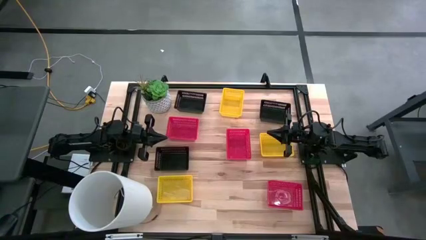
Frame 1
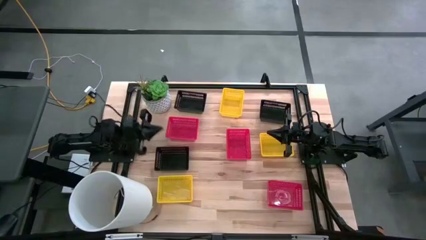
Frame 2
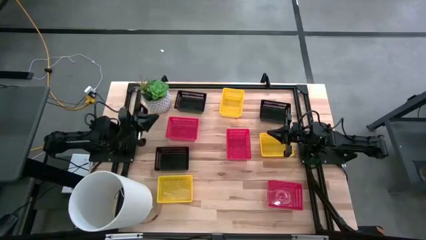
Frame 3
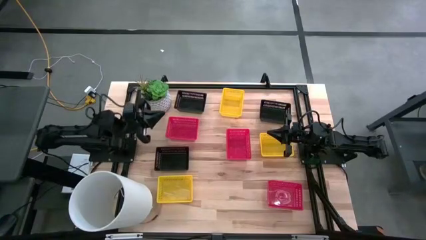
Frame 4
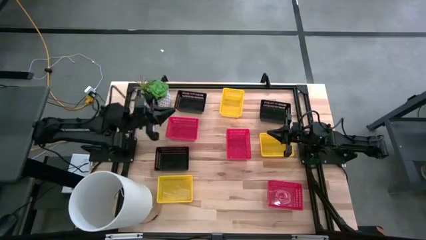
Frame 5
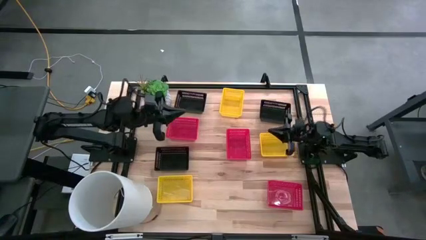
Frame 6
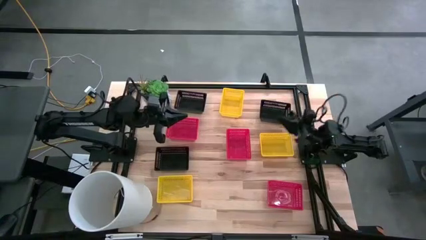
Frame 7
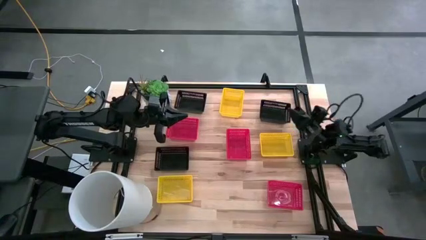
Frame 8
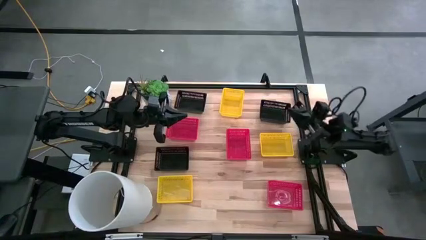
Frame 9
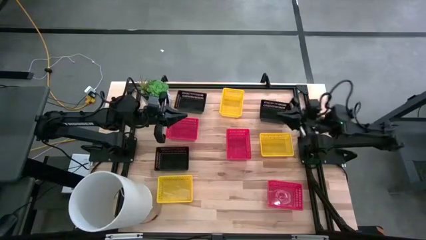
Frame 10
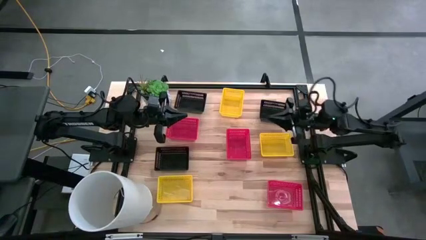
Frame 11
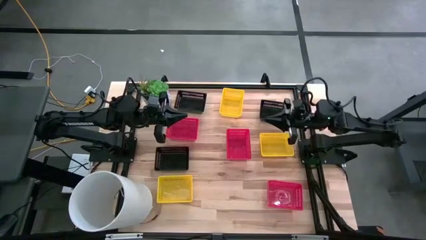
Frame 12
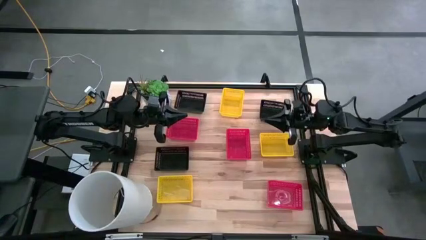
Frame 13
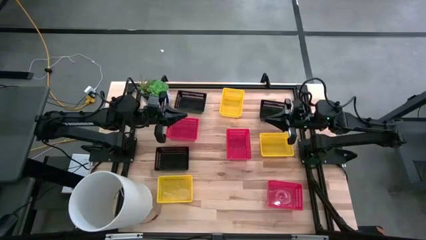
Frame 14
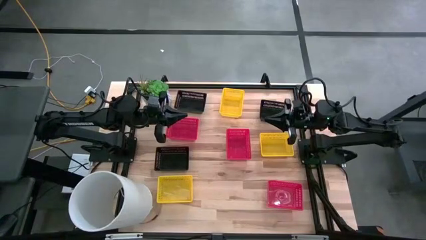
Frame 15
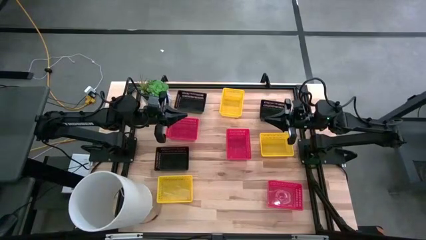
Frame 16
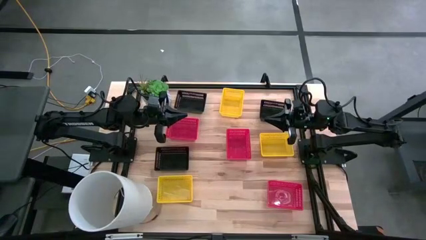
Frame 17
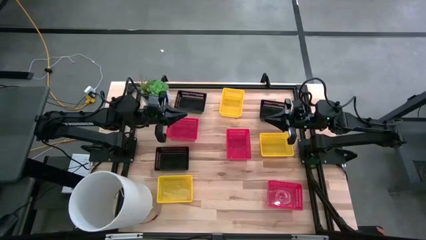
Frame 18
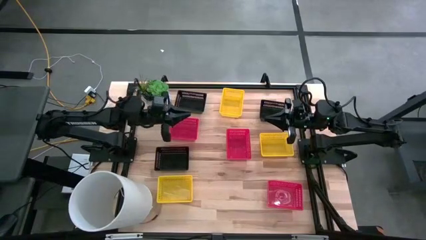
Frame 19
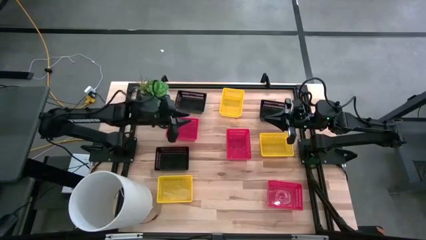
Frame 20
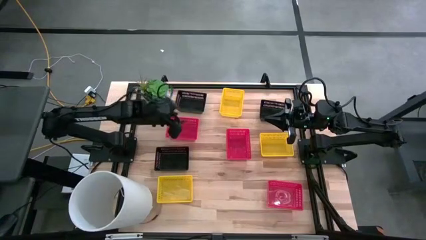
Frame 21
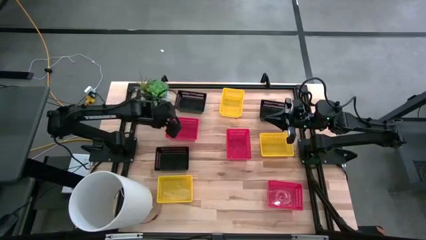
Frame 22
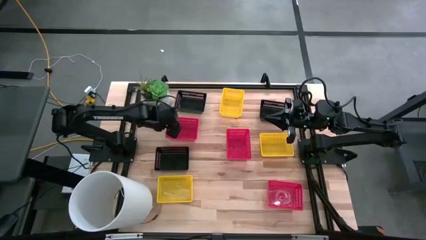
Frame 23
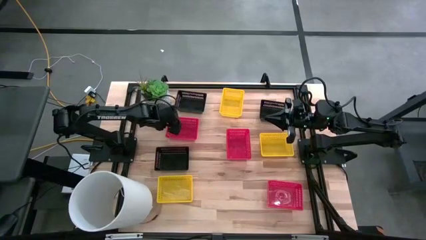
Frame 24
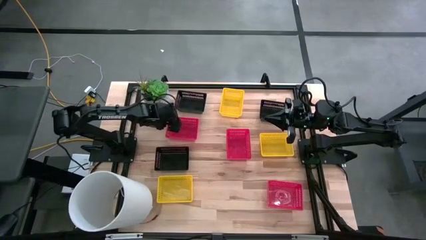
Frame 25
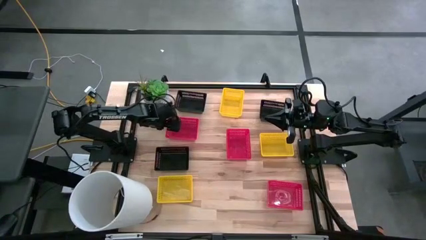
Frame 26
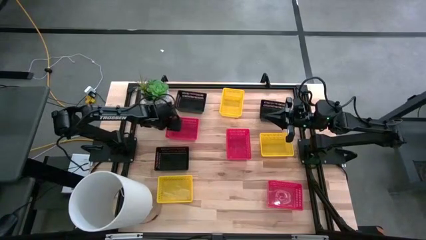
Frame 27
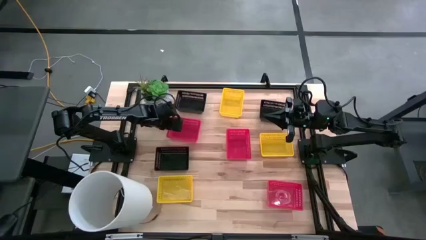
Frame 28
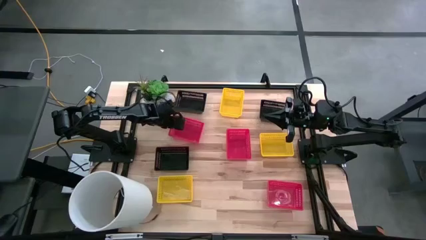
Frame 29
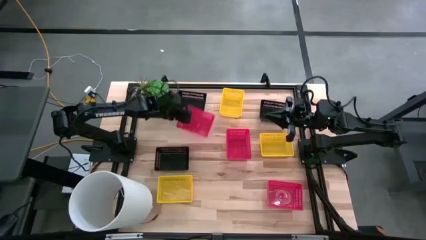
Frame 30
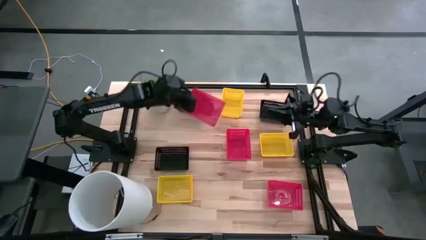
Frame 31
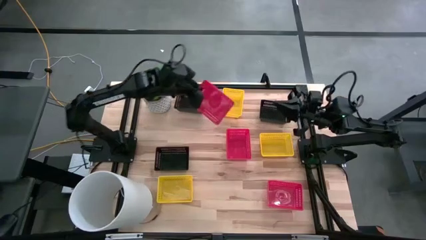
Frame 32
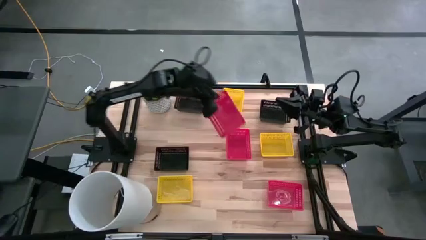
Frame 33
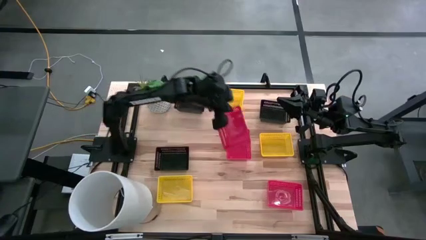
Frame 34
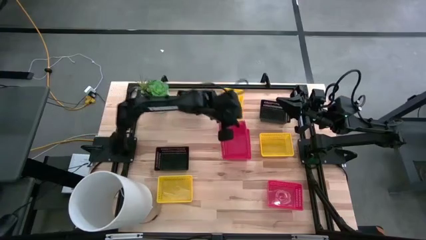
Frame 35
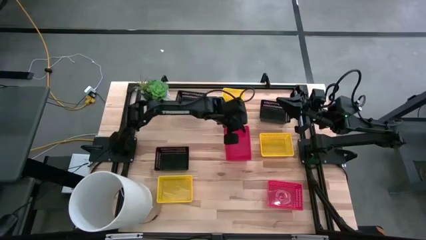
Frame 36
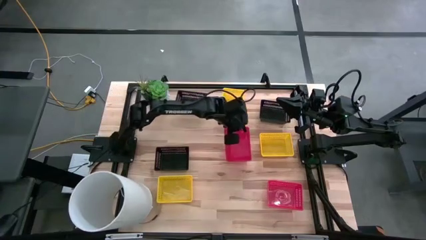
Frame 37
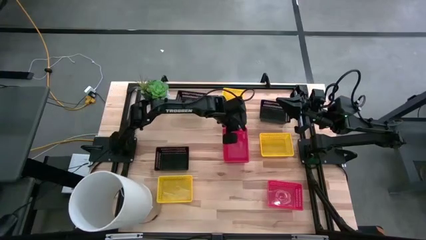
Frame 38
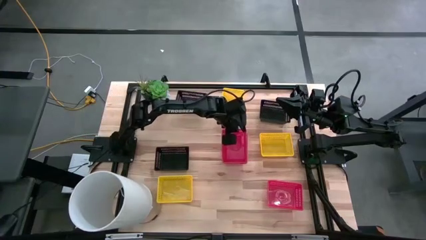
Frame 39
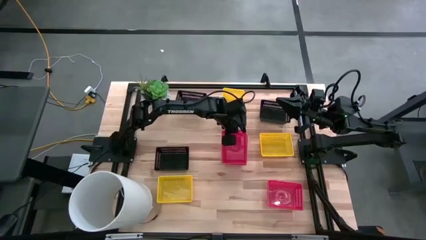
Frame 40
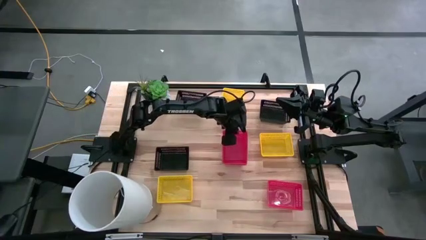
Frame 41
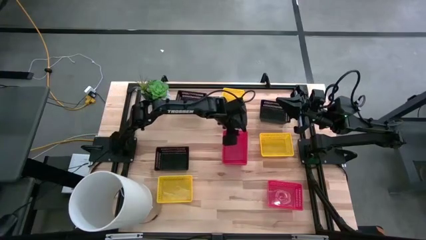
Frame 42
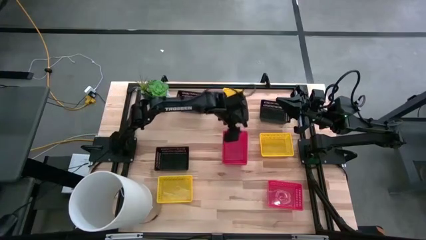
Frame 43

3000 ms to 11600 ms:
Stack the left red bin on top of the red bin

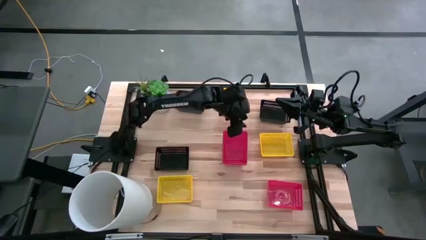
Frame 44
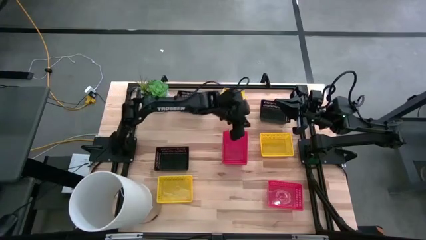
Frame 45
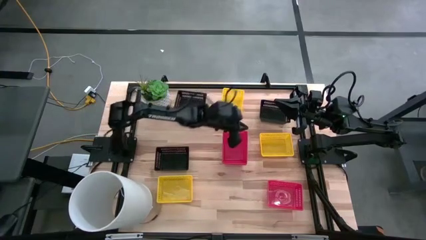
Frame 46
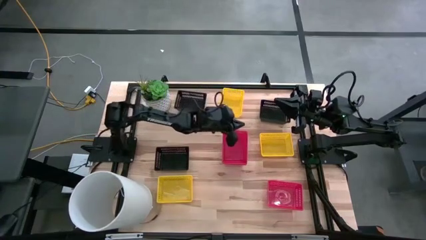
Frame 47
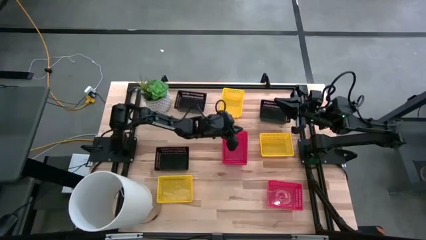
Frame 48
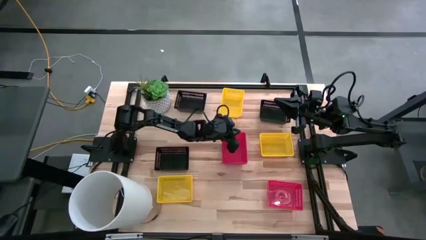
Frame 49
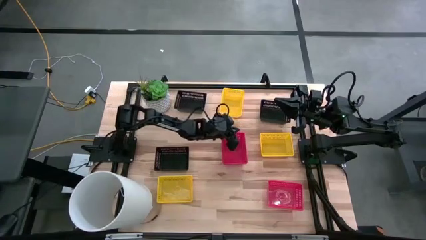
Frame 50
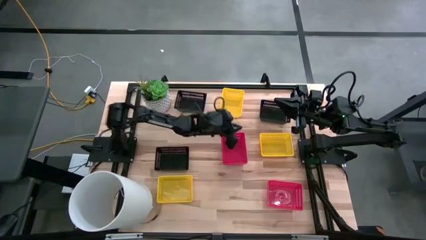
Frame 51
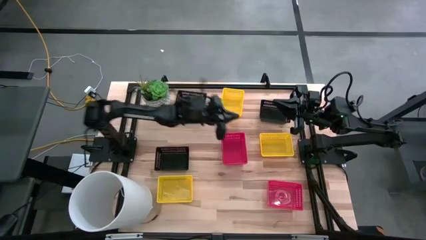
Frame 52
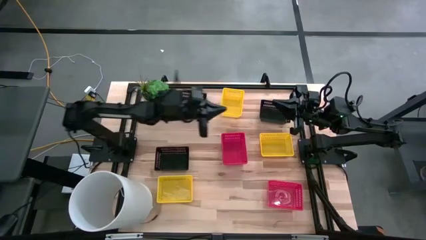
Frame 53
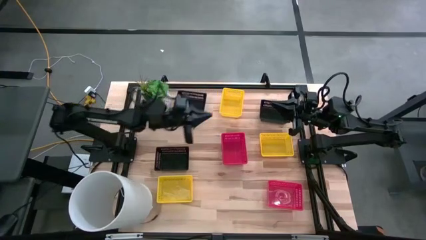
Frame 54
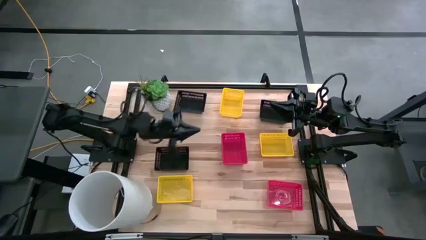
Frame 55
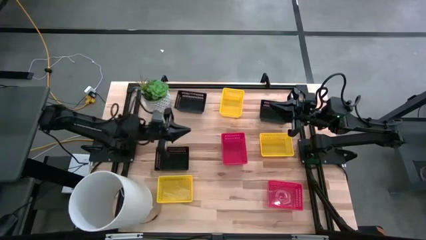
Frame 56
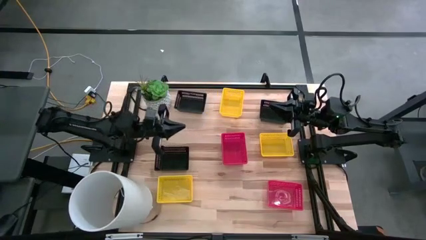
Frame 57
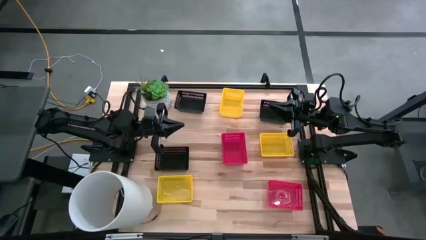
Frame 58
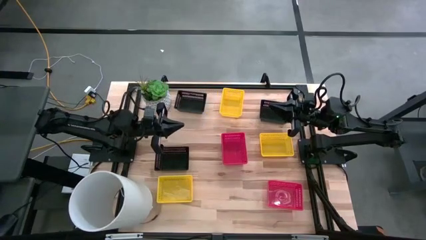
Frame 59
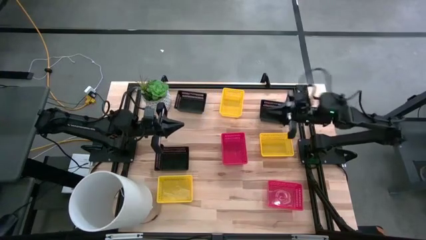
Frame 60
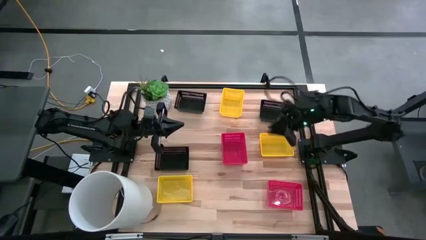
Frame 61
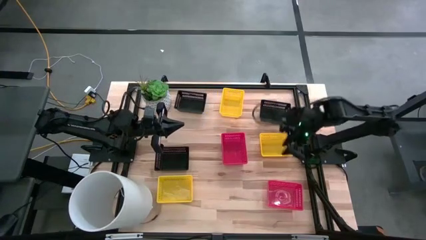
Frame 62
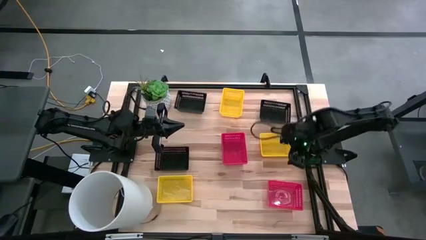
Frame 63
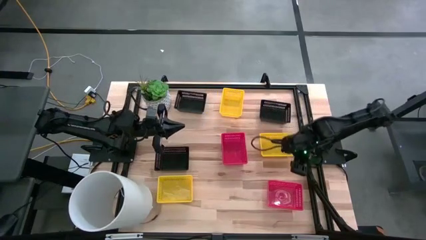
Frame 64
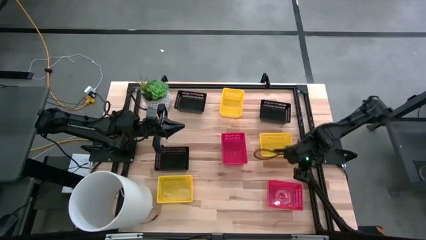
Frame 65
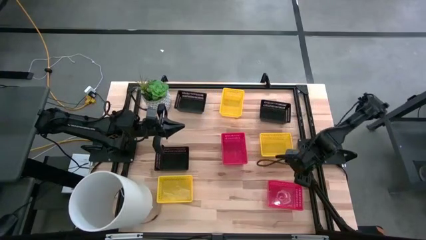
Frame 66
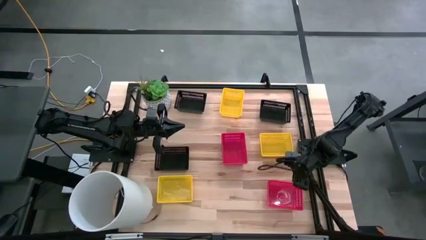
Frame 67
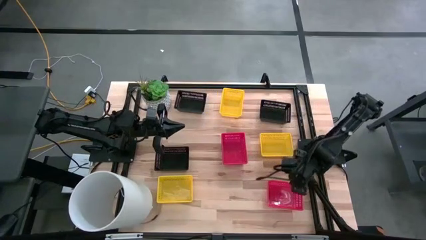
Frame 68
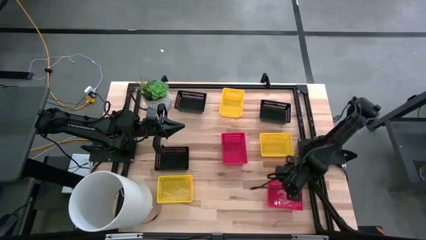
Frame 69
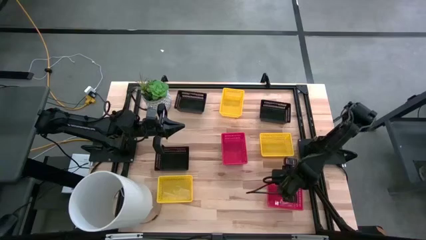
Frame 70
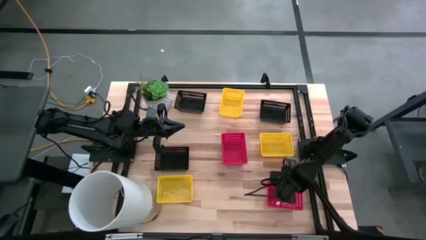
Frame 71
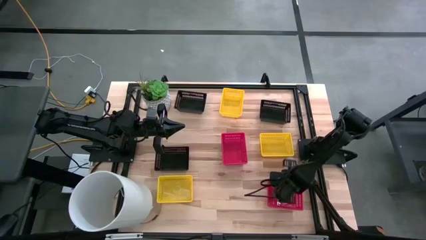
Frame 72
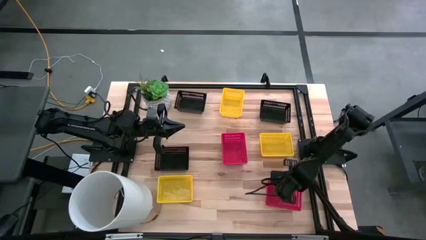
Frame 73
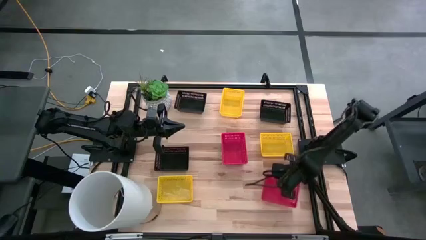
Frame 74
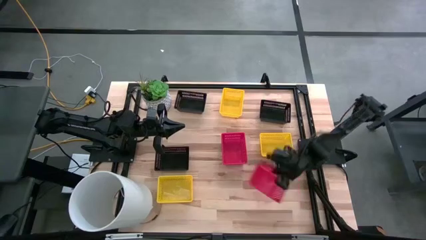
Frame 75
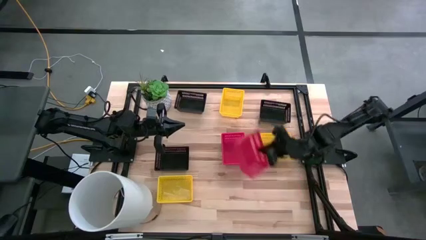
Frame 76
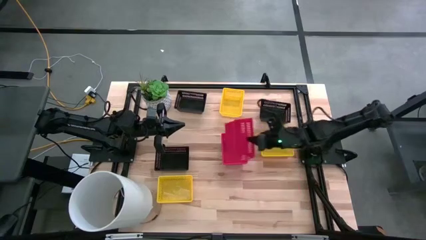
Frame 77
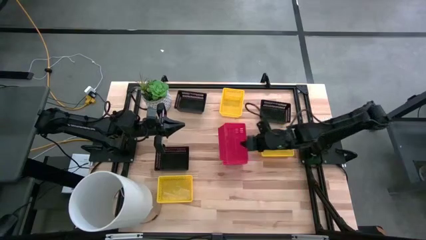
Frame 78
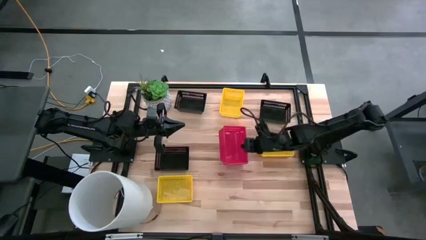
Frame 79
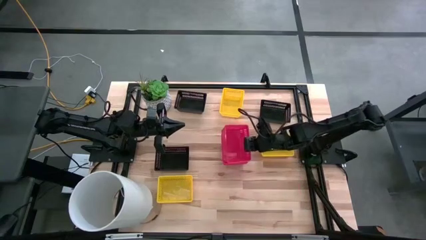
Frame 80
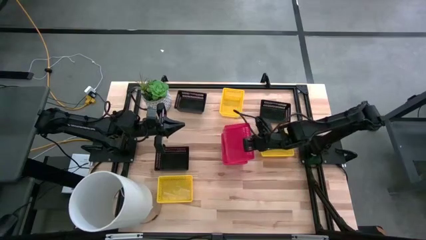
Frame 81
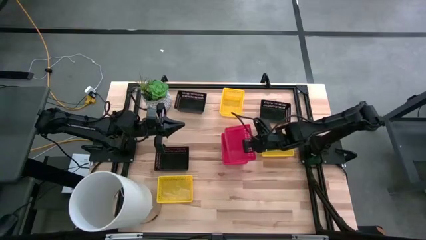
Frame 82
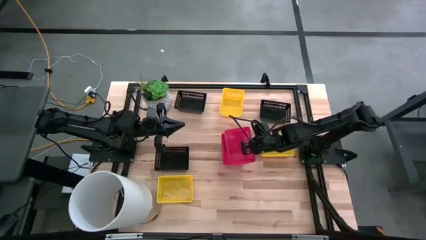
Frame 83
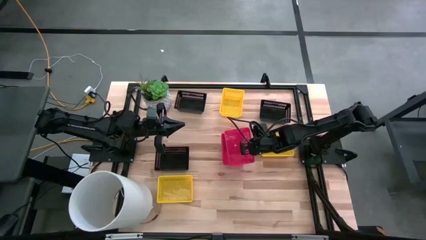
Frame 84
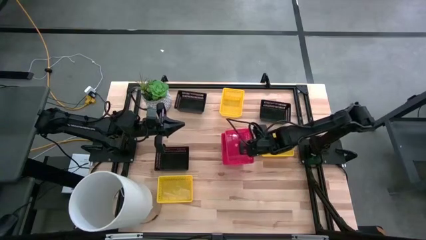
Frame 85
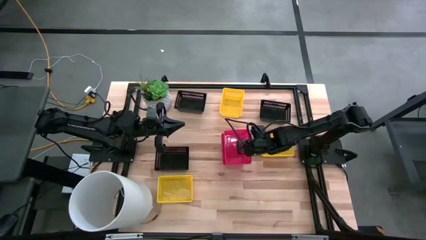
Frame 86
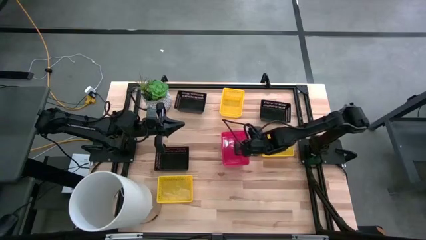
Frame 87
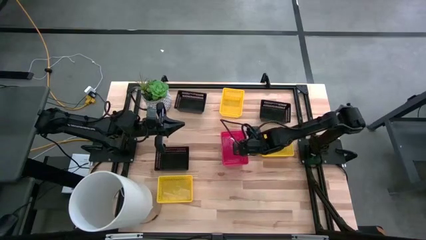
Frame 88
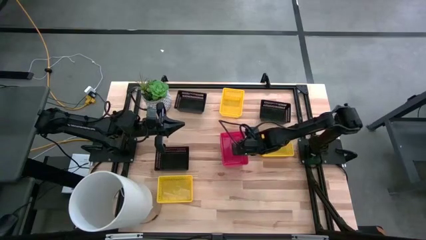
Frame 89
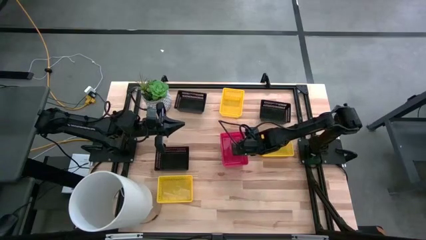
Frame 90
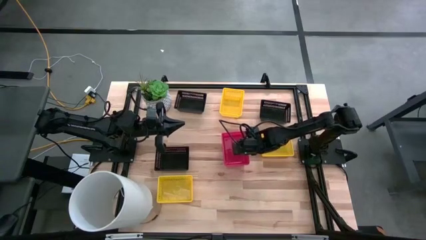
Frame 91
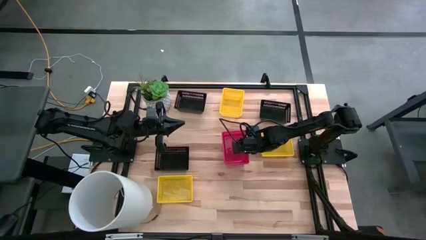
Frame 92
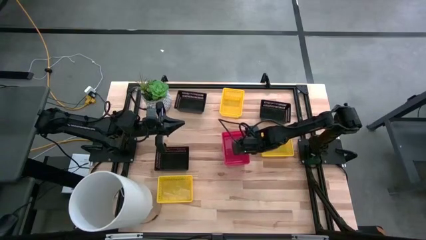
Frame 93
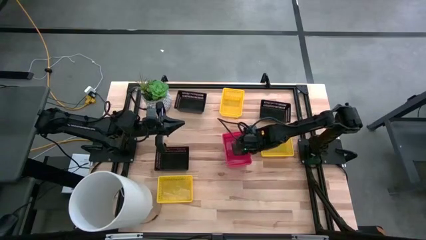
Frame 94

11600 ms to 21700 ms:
Stack the red bin on the red bin
